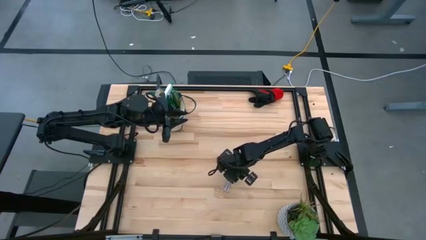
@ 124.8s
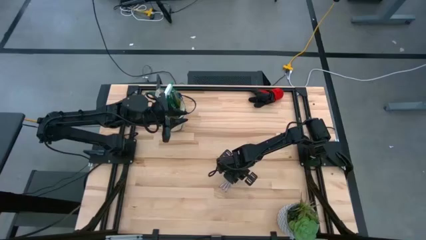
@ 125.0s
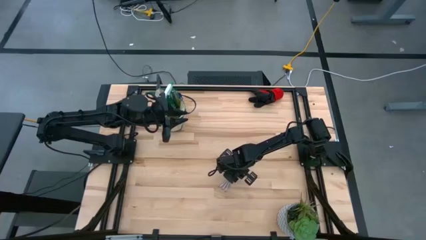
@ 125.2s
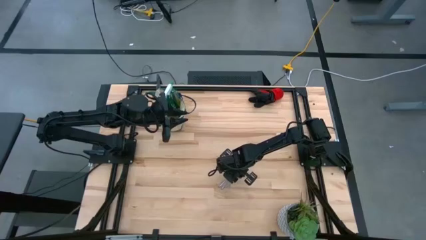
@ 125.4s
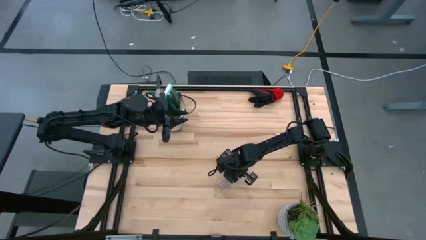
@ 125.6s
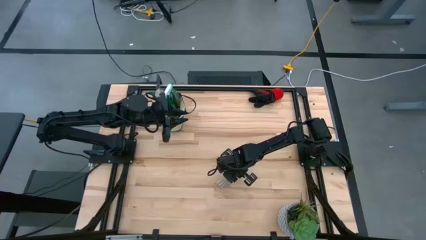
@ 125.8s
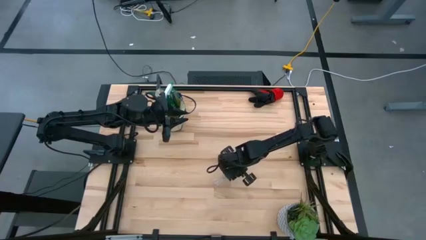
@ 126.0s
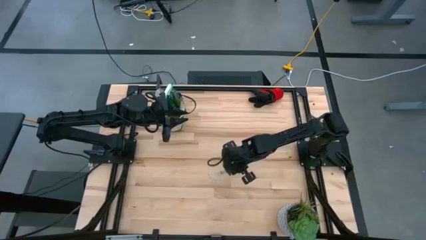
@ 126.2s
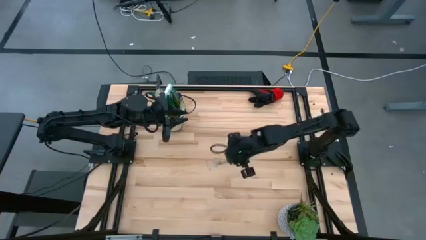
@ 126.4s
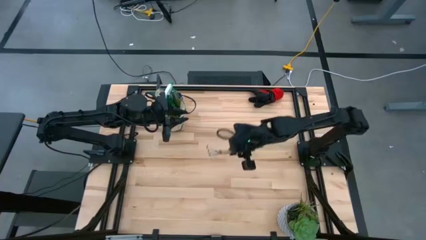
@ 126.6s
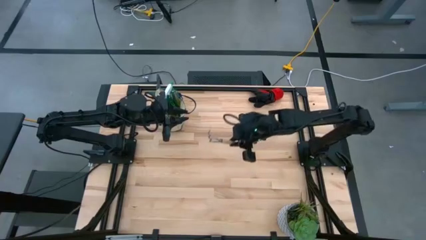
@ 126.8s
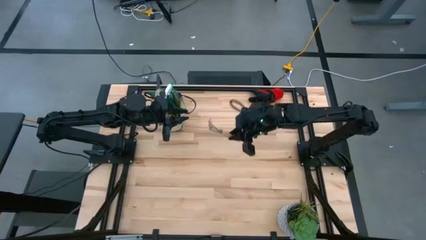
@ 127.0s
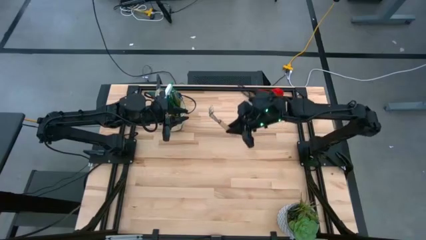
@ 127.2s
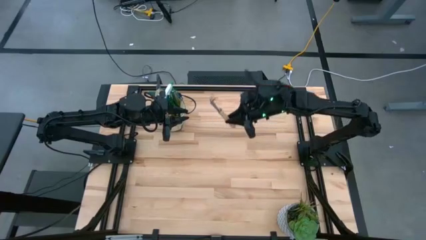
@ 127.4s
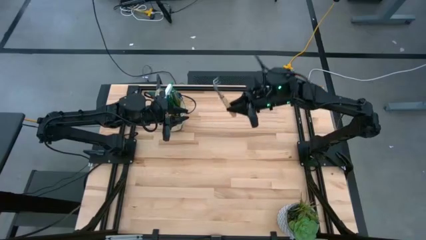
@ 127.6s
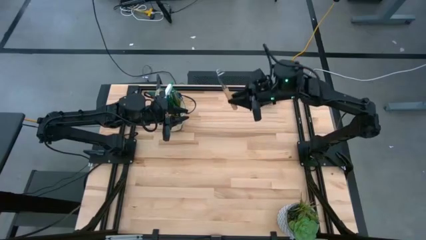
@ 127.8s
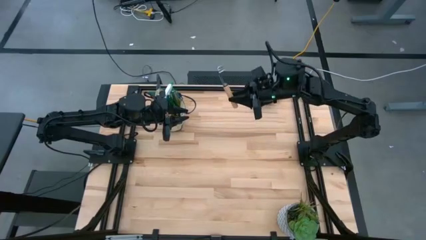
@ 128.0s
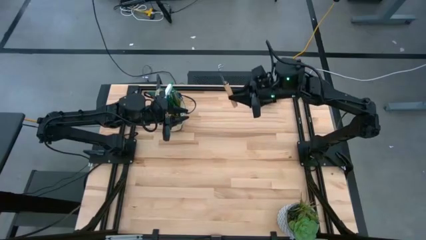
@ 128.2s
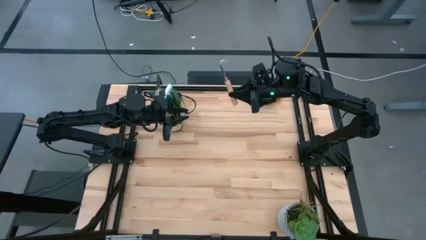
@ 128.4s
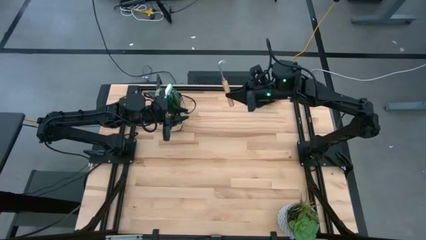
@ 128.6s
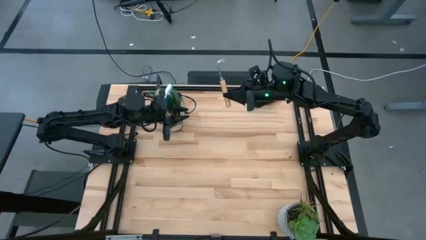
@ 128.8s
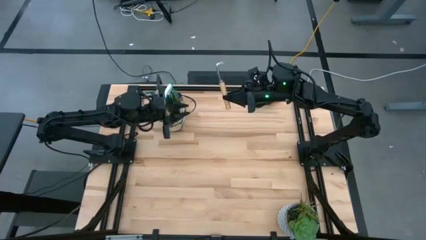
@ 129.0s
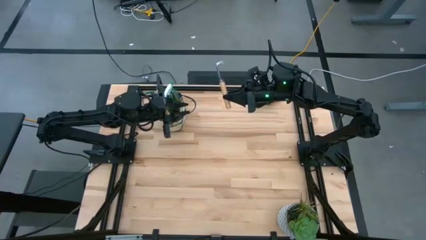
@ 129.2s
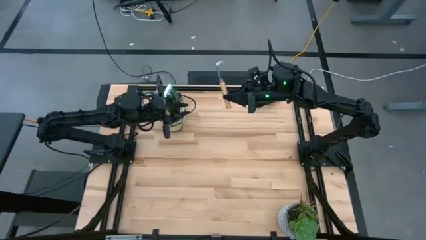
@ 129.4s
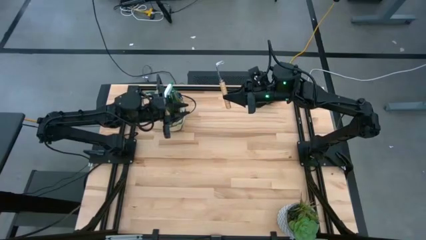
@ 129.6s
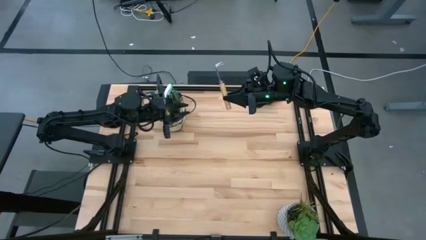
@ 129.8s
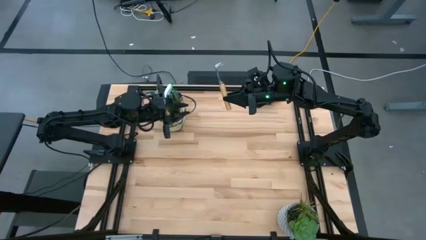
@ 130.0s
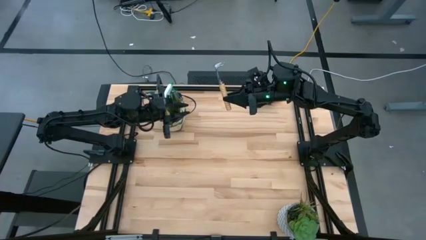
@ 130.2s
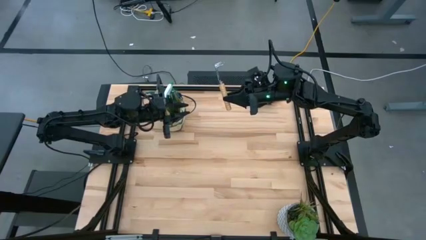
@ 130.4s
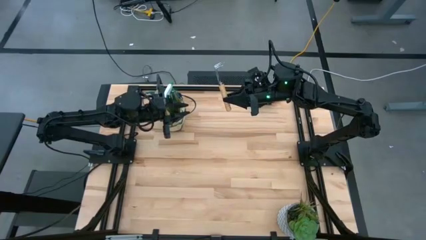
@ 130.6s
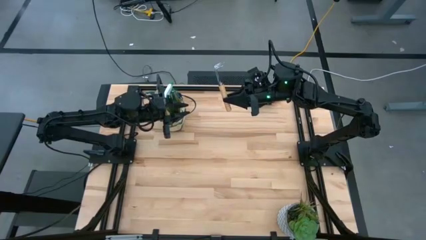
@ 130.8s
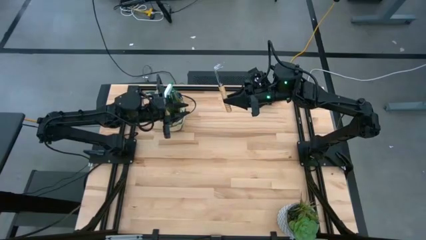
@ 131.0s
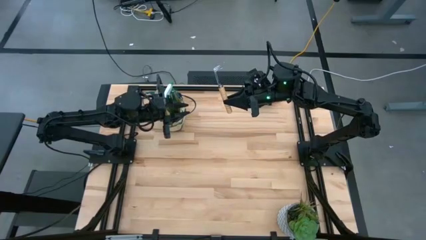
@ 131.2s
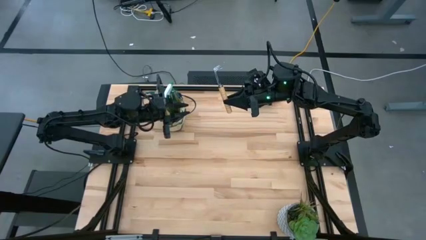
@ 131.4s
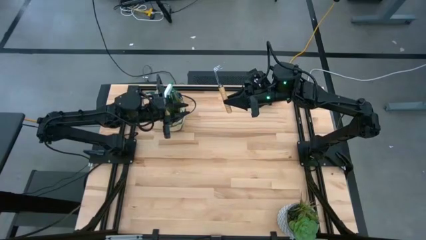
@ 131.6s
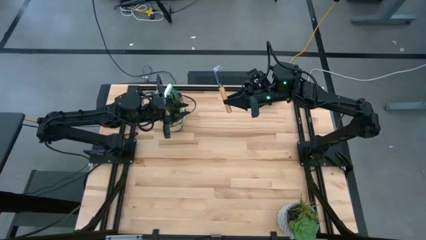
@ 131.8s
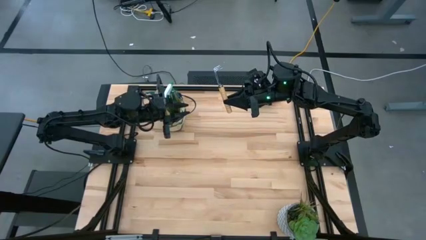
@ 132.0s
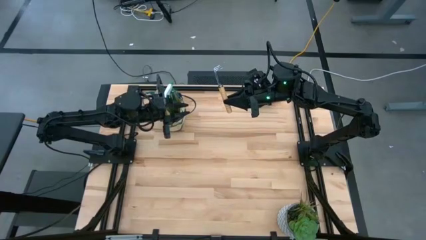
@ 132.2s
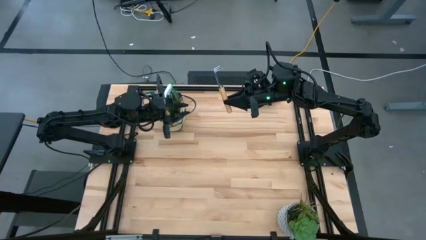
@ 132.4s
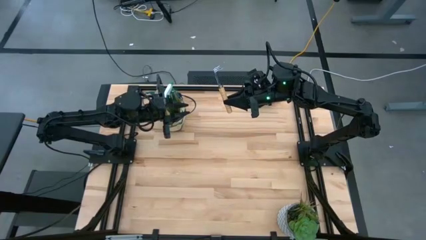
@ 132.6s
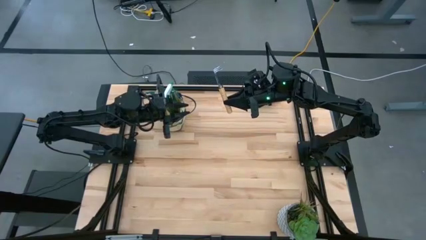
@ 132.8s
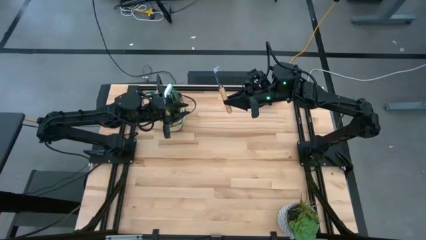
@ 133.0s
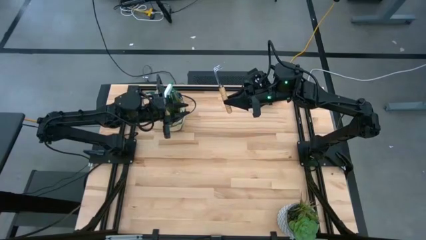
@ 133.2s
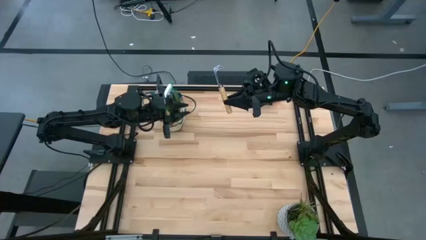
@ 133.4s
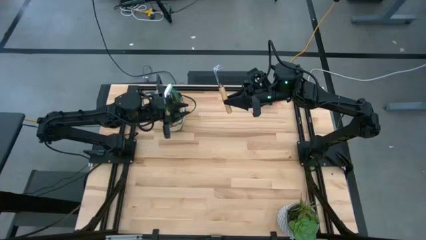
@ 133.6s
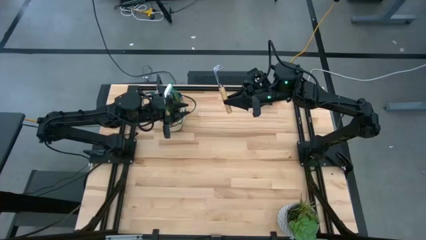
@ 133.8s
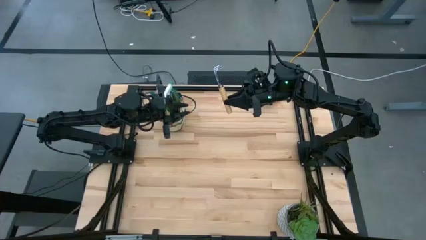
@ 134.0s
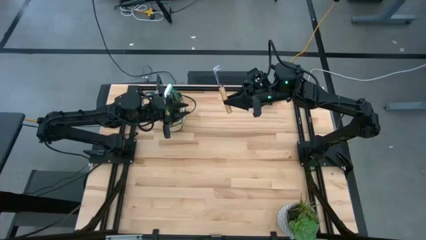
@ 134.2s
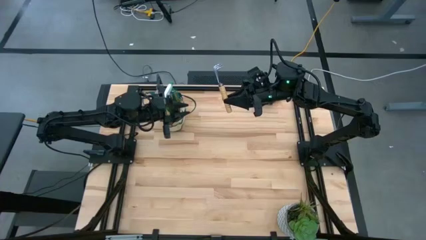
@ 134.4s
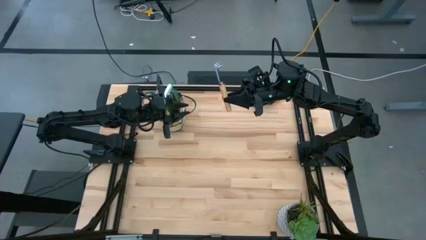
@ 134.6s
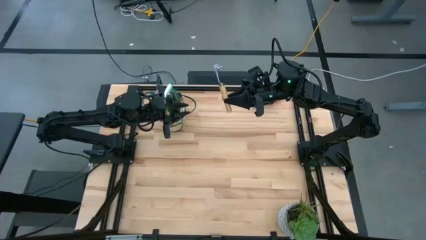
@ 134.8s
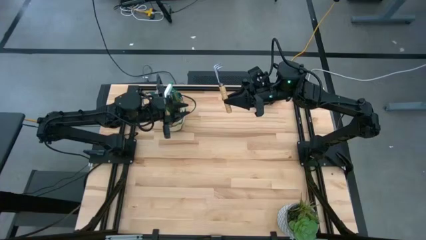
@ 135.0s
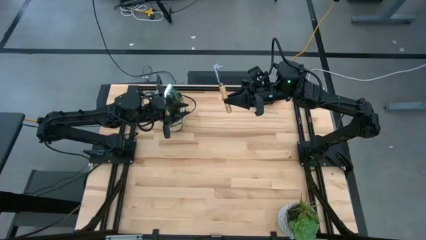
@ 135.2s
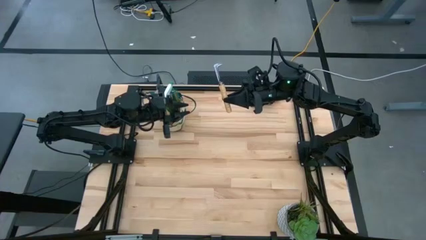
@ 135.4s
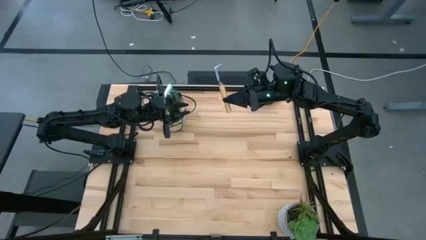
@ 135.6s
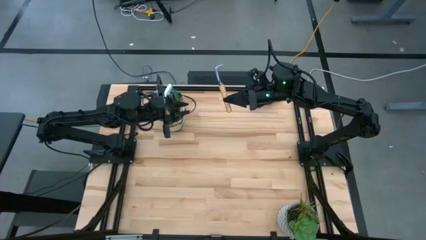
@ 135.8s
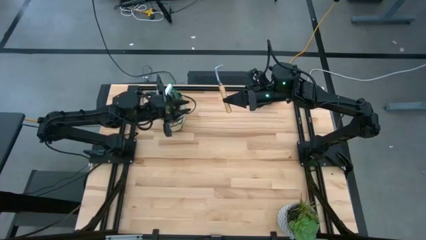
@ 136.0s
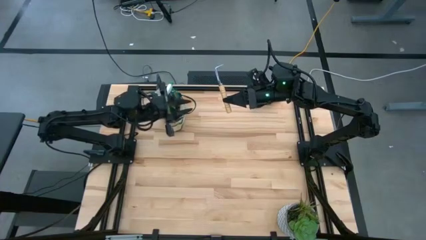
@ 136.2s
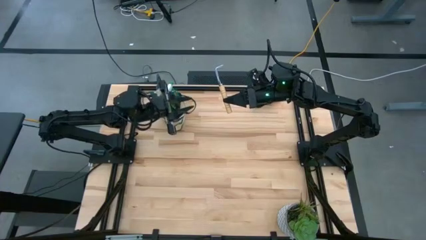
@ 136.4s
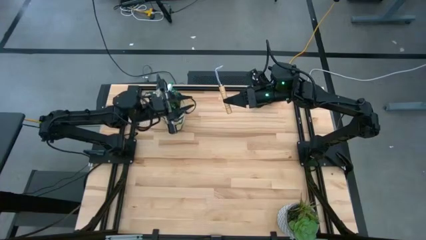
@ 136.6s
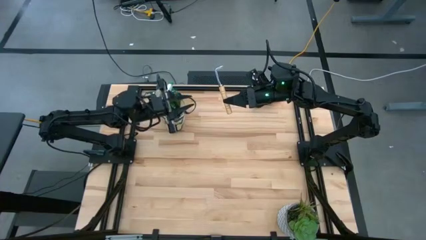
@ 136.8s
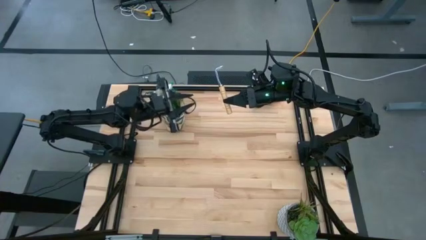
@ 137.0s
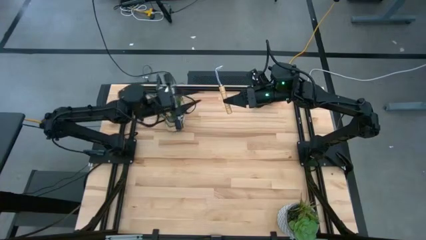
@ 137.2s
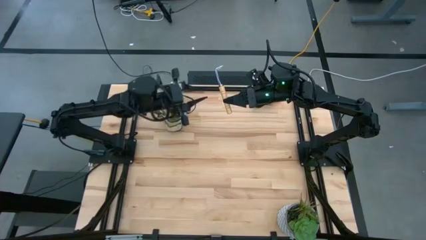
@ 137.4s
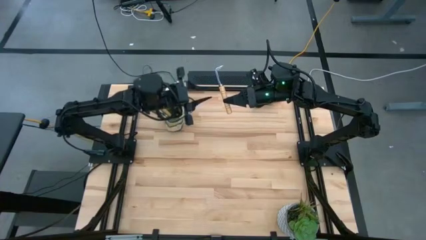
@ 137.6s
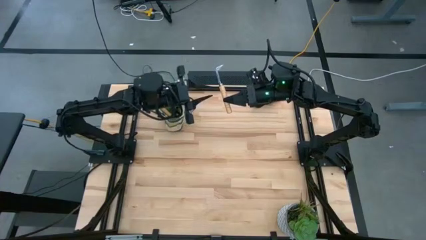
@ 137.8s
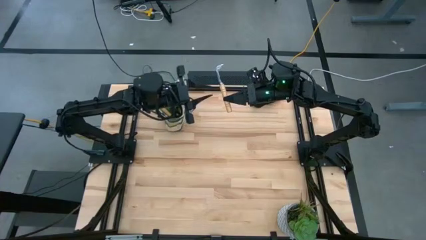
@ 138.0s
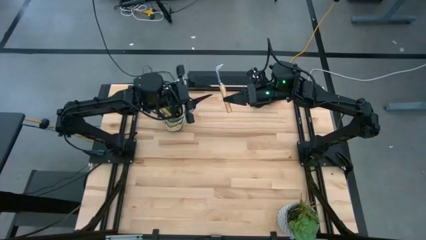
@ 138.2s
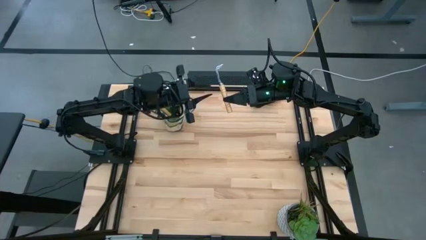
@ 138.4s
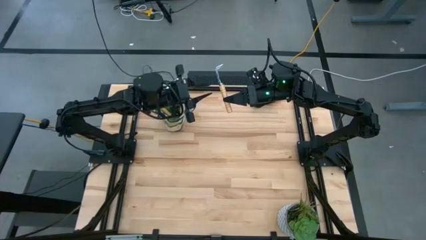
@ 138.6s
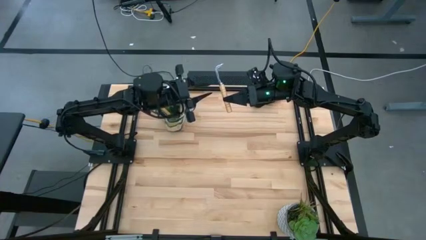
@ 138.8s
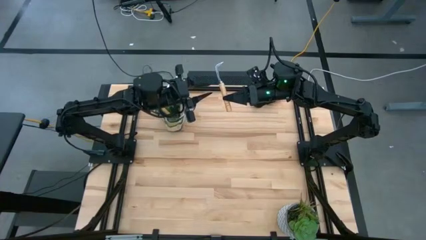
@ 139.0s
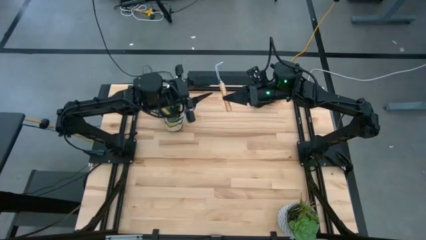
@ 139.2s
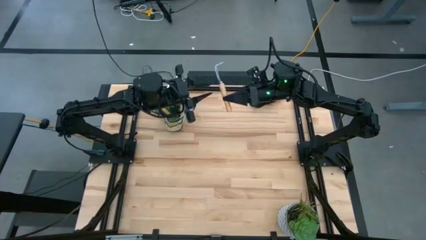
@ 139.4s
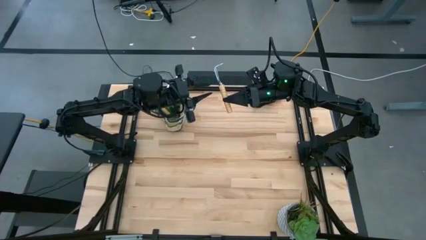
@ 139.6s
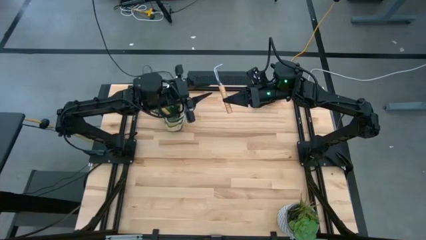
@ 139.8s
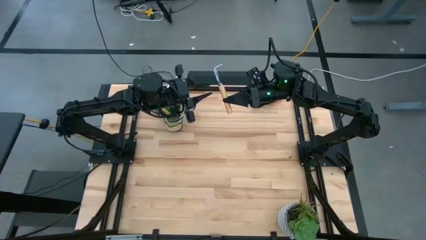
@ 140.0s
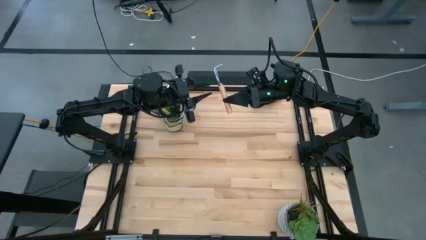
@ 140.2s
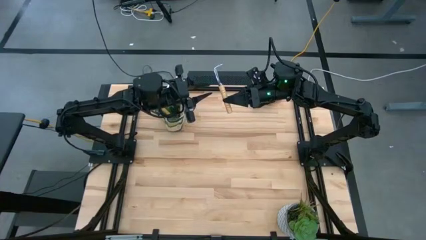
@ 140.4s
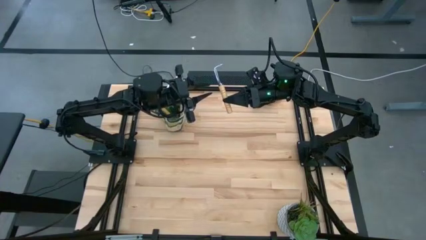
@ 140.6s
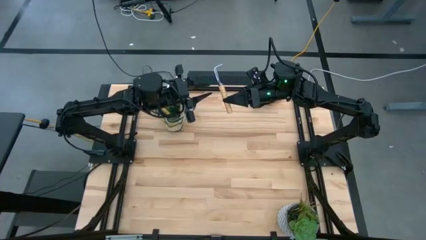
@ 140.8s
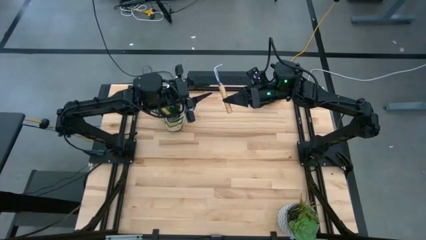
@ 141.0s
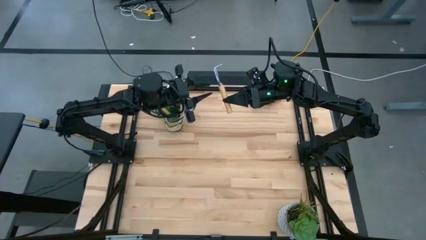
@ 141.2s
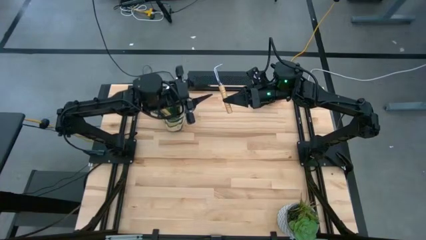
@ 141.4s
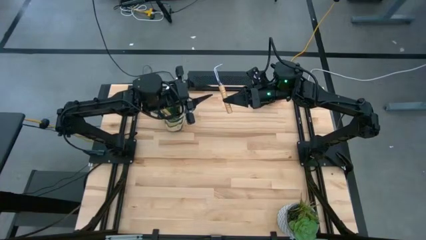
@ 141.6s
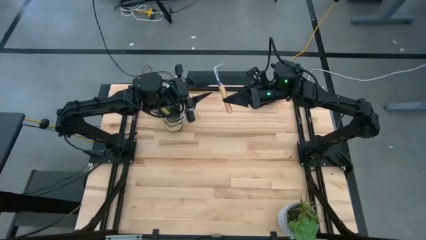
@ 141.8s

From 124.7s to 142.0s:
Task: Pick & Place Garden tools in Gardening bag
Put the brown hand rake into the gardening bag
